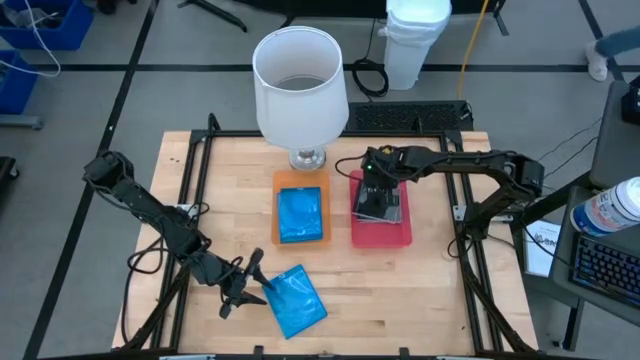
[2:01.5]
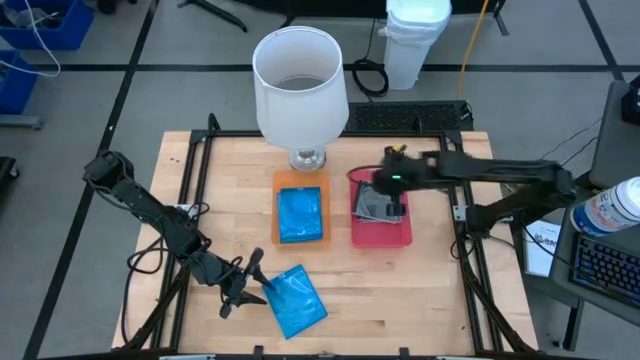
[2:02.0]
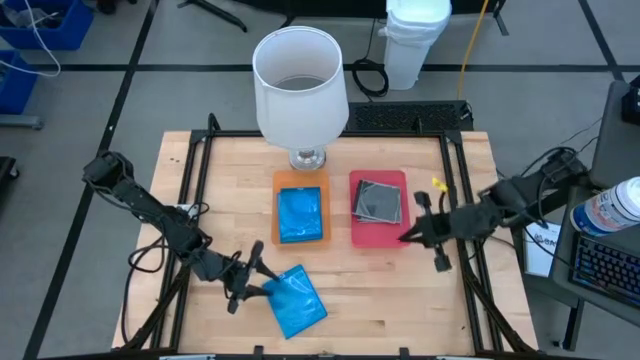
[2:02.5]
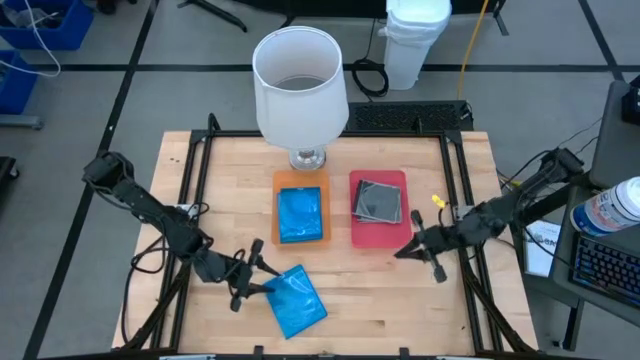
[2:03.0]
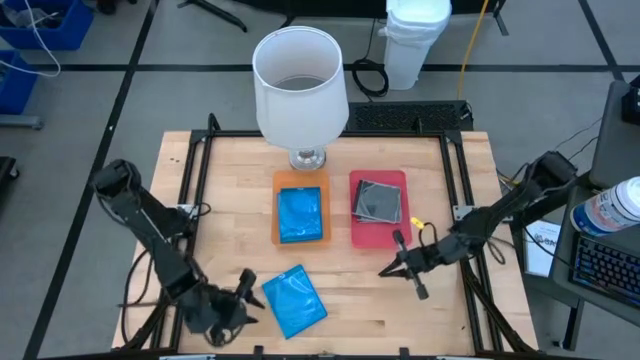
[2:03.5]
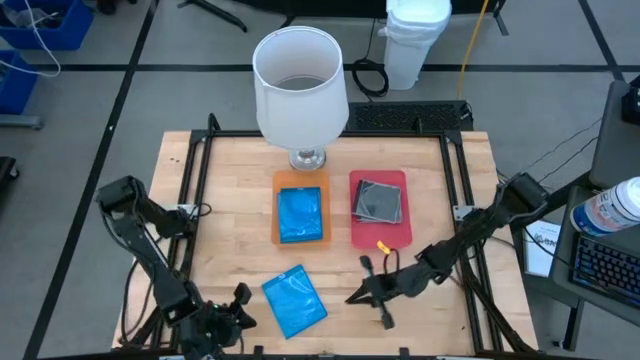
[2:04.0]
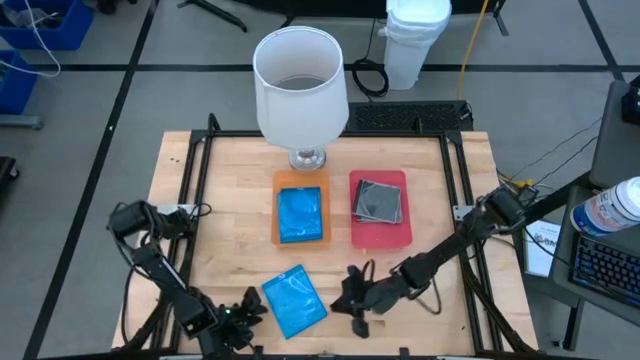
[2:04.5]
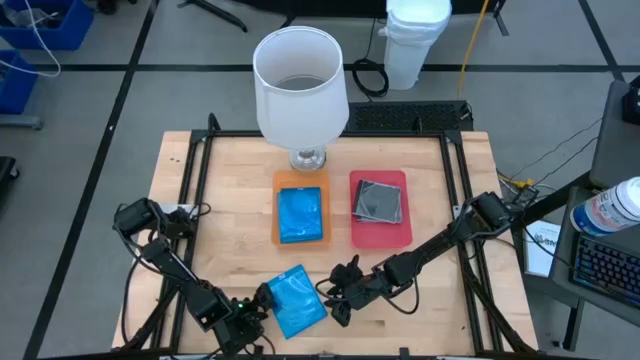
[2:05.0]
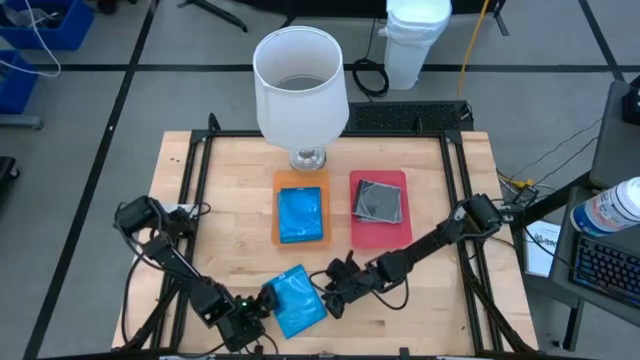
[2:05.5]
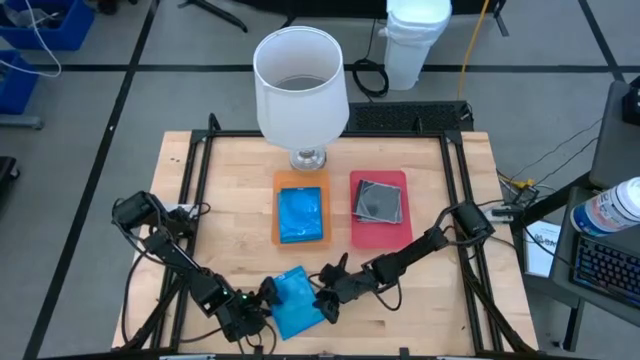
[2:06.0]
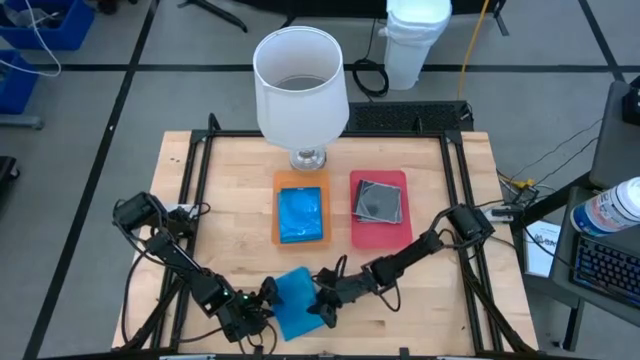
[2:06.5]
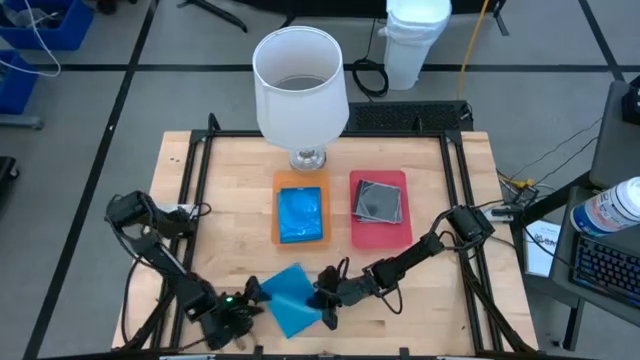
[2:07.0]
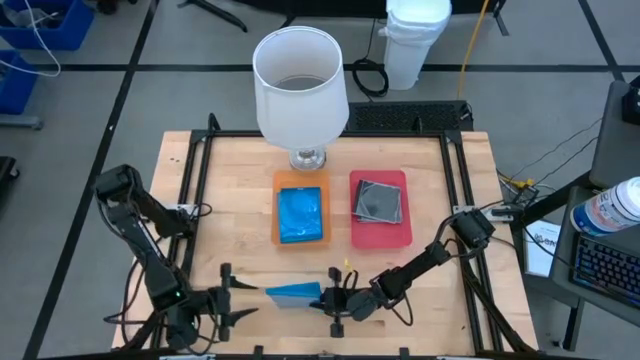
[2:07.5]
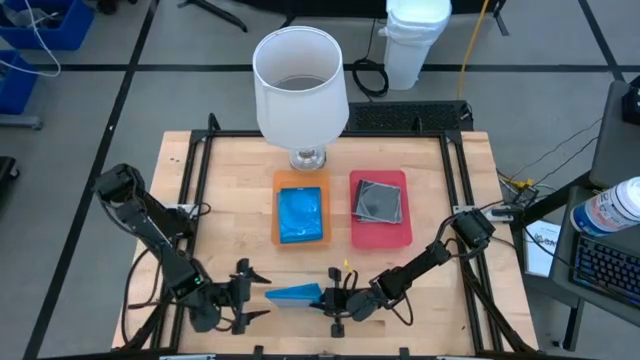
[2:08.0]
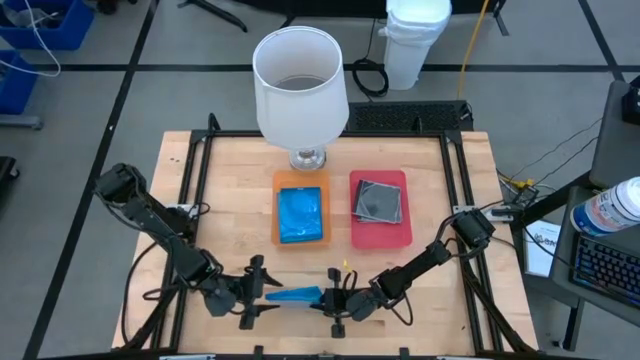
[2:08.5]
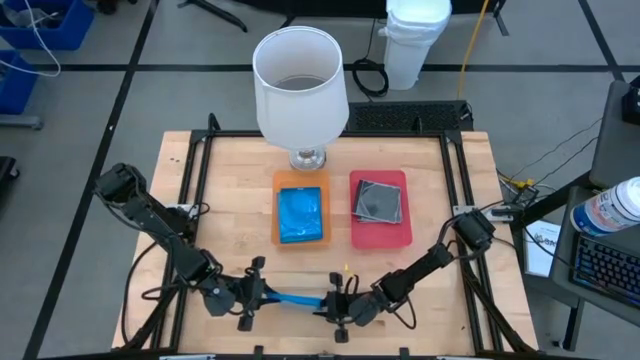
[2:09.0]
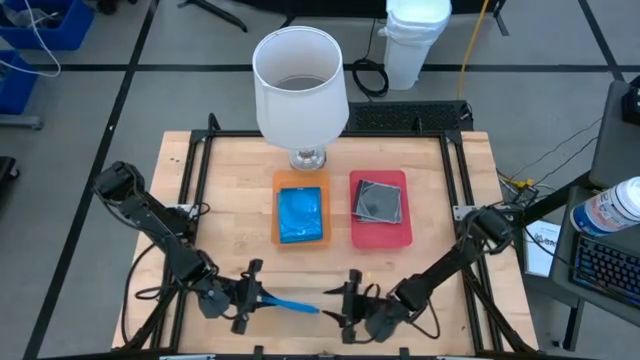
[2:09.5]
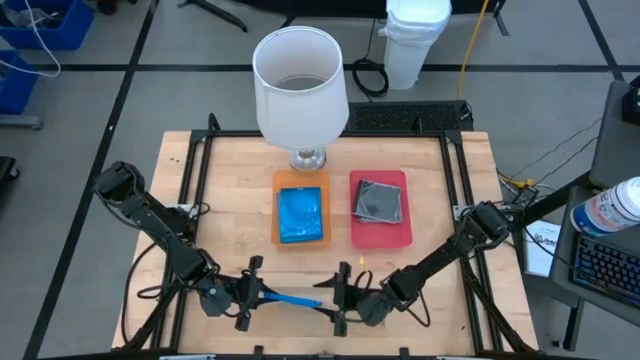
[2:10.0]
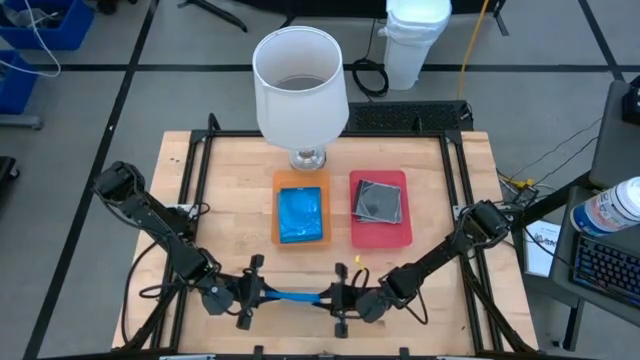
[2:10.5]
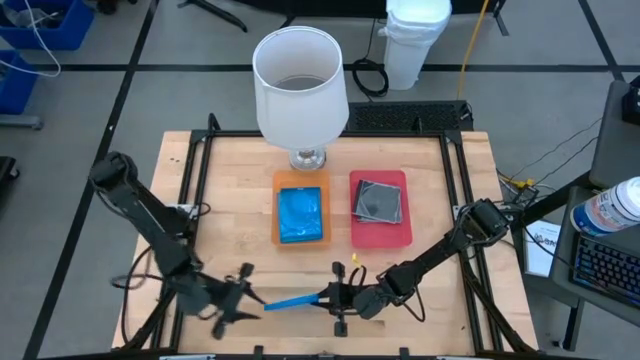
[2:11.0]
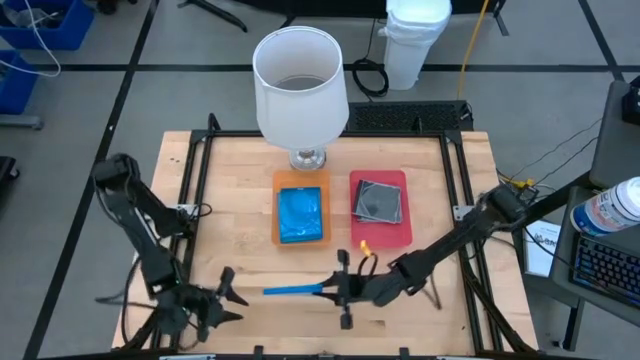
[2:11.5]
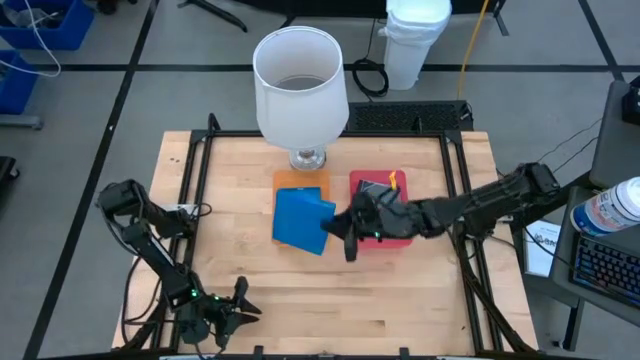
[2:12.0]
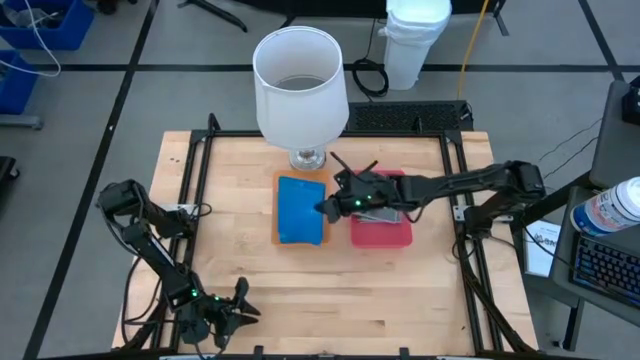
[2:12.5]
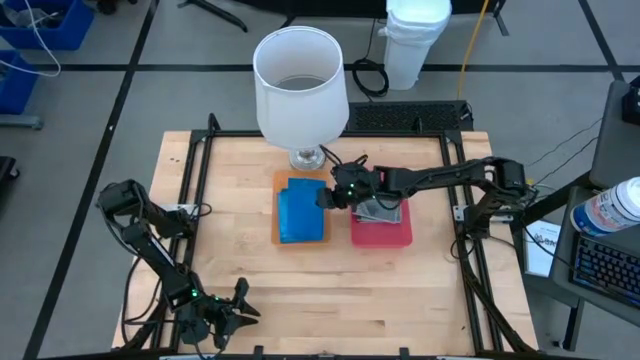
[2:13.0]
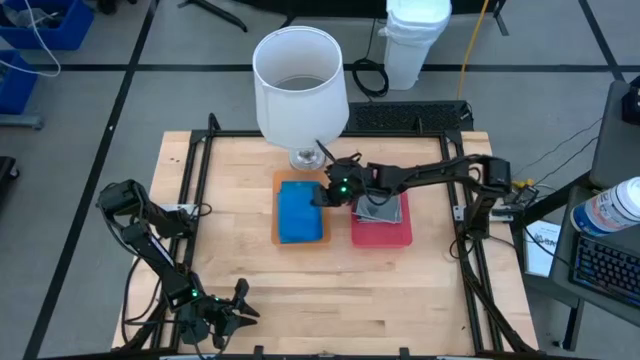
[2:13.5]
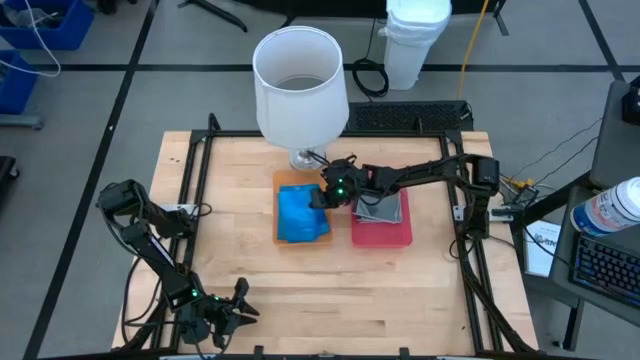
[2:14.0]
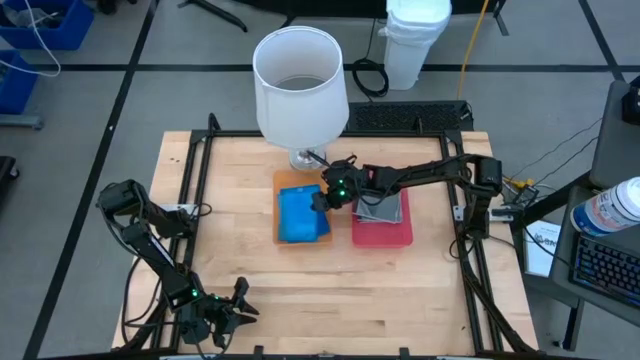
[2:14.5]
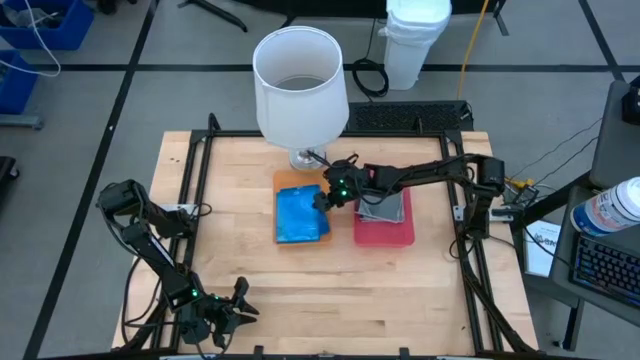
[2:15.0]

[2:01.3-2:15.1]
Task: Pick & place jewel cases by type
Put the blue CD case into the orange bin

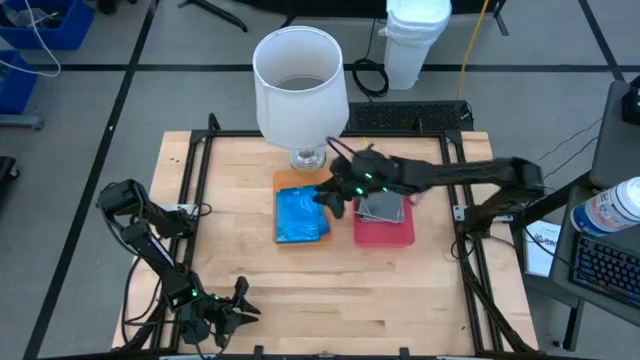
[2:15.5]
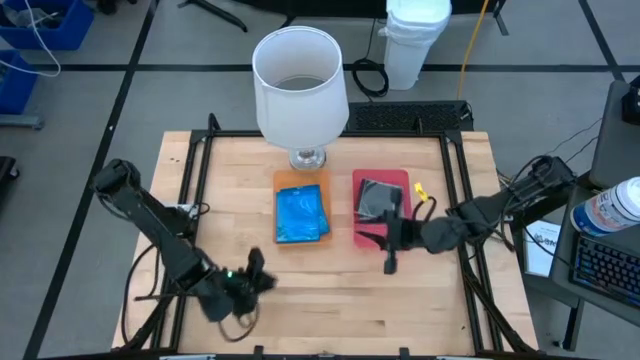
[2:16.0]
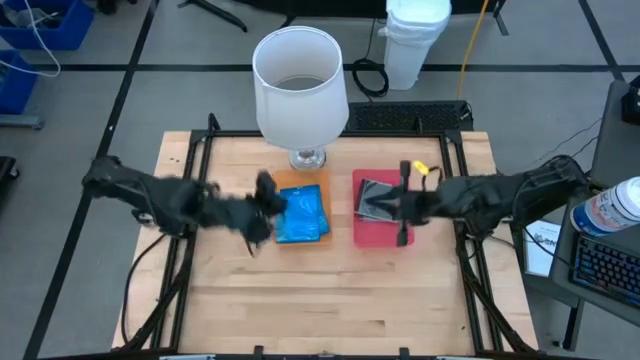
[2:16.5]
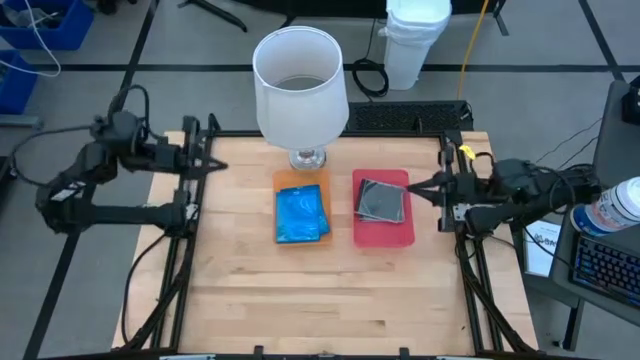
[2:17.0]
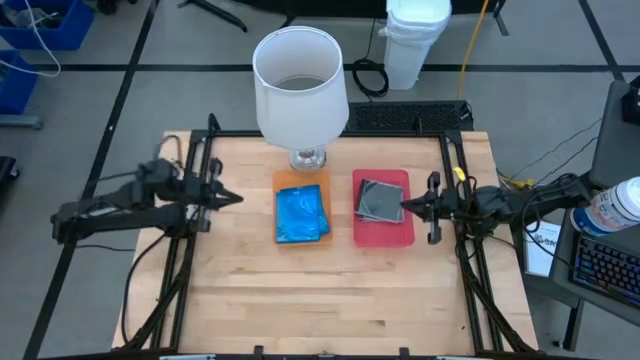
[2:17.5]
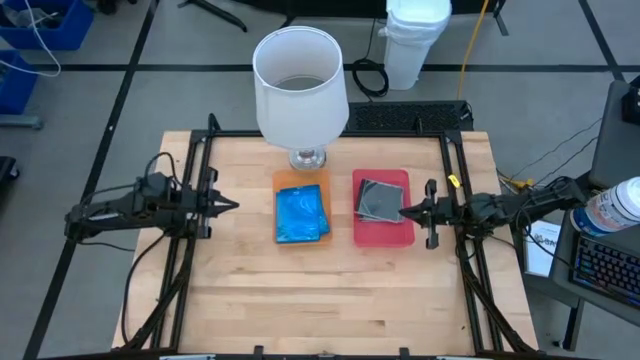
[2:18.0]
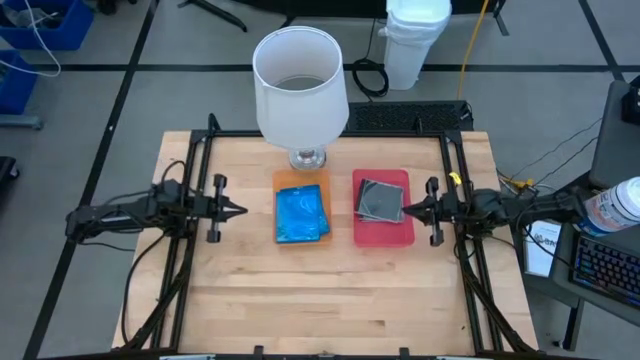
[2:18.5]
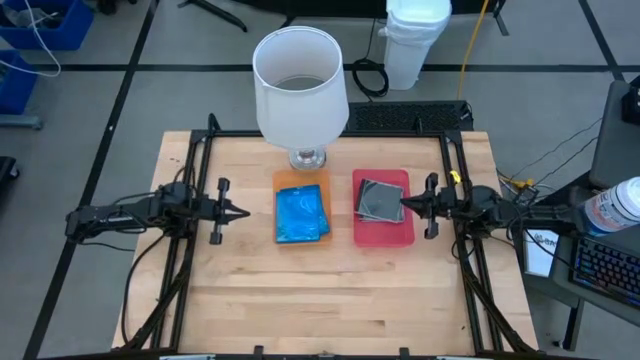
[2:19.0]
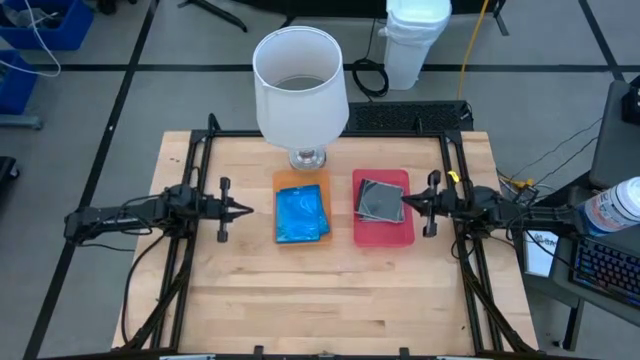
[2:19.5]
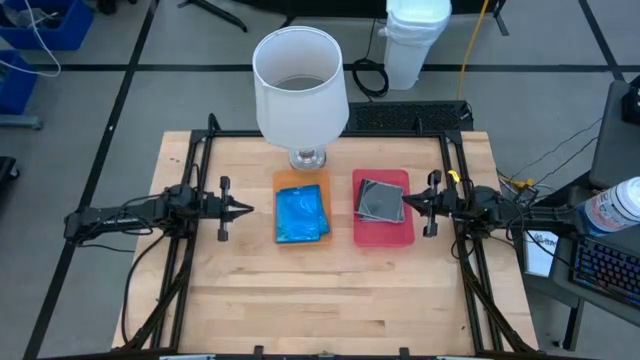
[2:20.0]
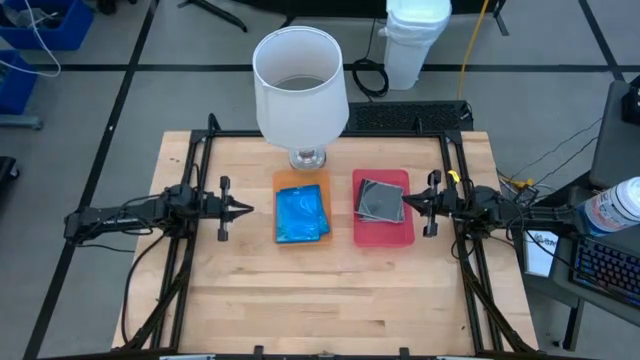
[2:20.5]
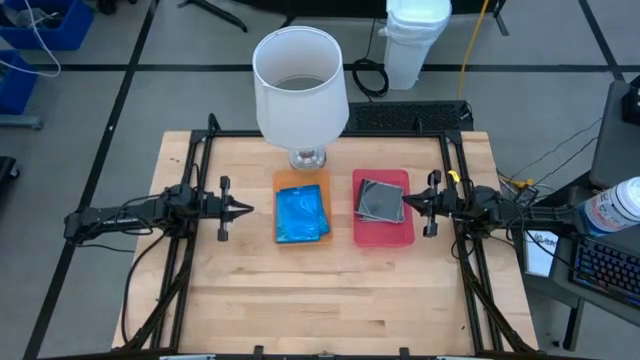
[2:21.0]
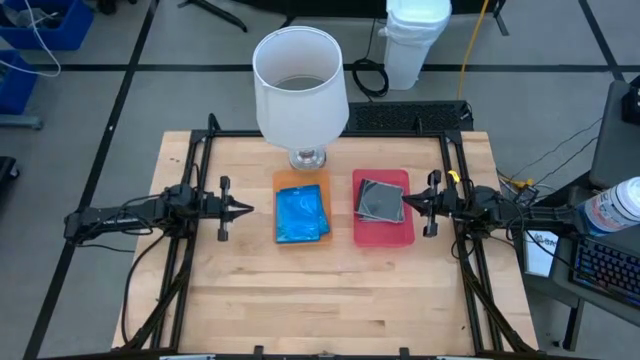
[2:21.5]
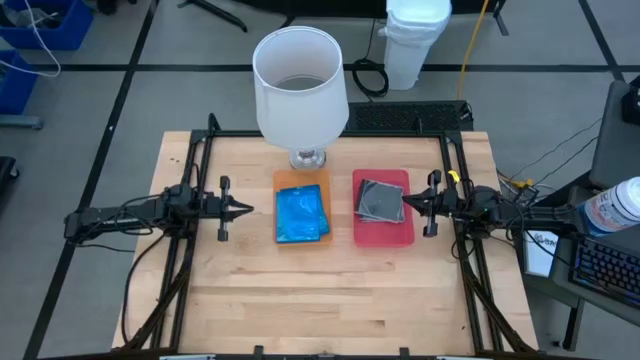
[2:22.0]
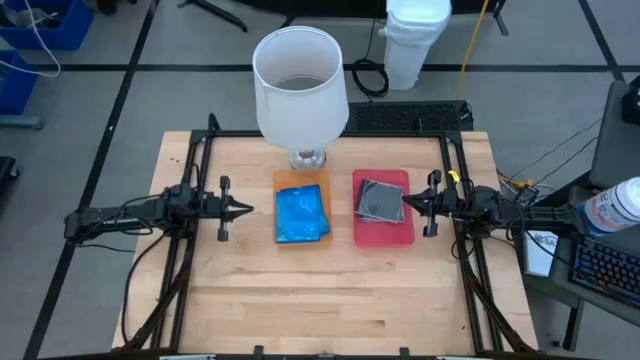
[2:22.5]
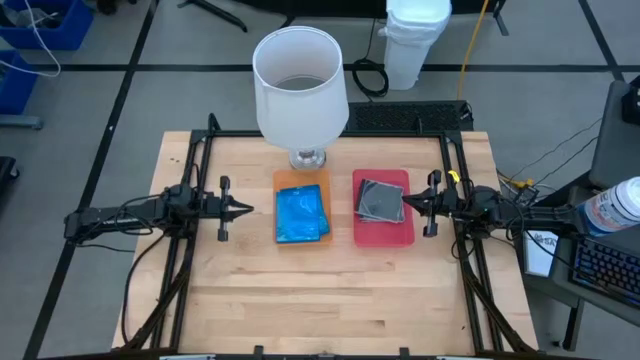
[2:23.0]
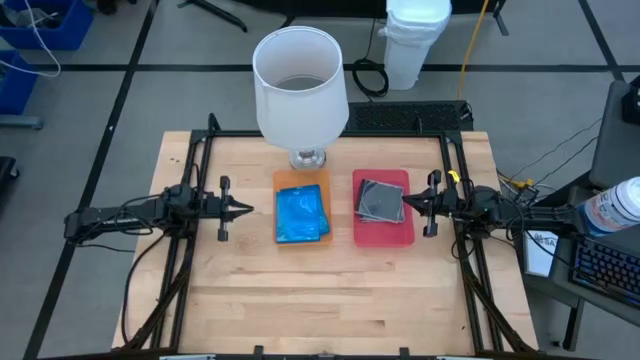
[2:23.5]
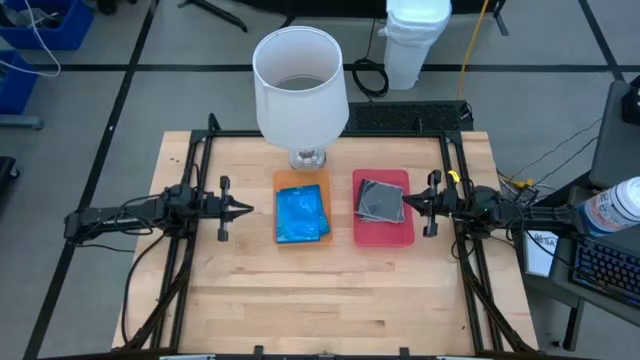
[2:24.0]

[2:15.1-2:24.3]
Return to Home Position
